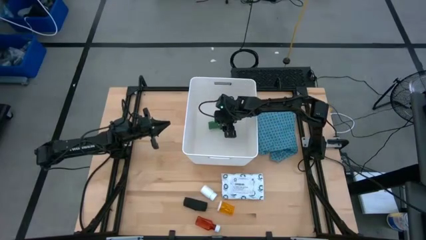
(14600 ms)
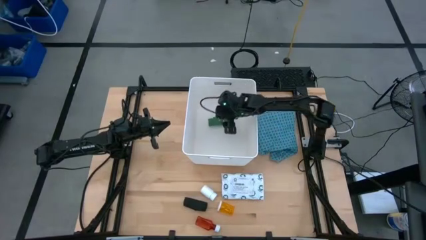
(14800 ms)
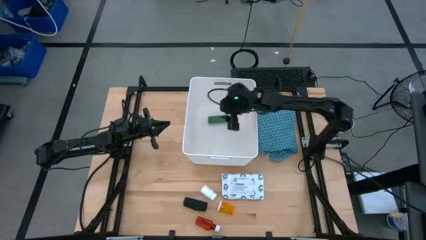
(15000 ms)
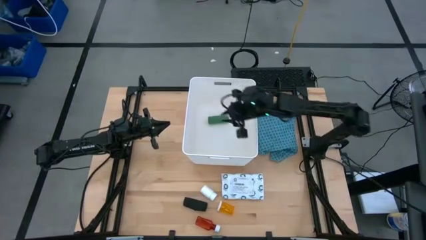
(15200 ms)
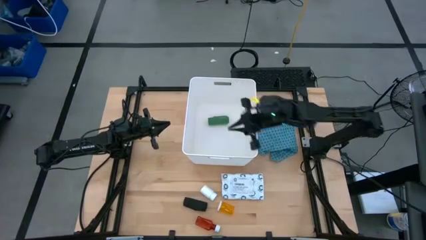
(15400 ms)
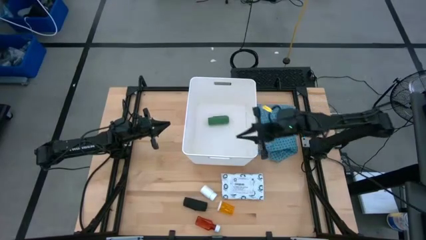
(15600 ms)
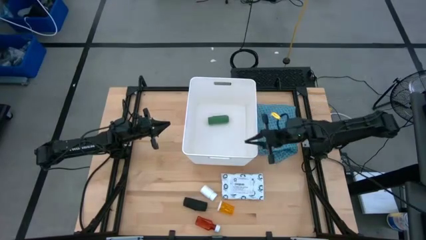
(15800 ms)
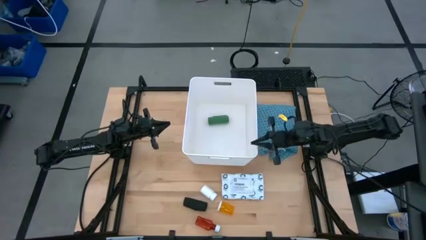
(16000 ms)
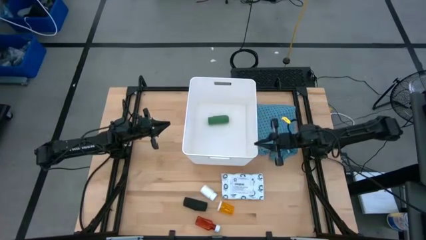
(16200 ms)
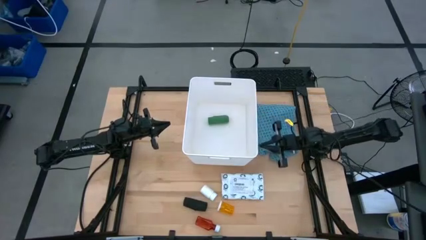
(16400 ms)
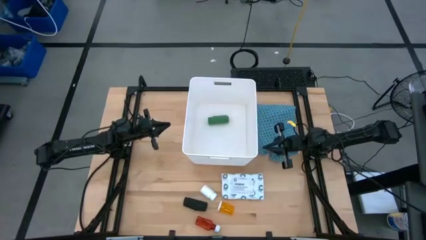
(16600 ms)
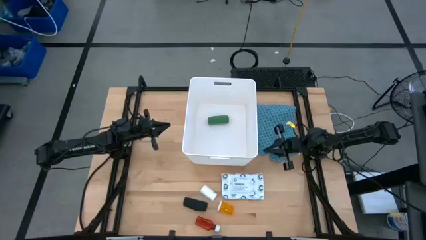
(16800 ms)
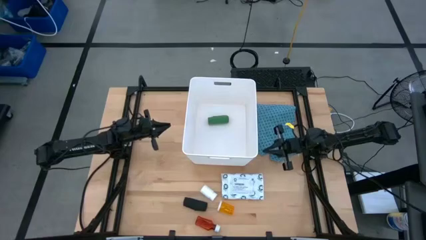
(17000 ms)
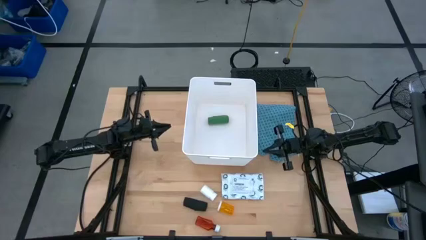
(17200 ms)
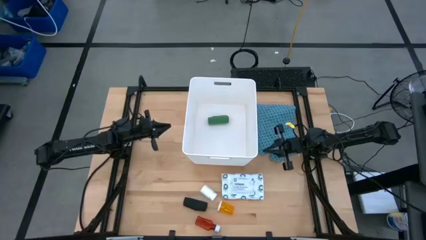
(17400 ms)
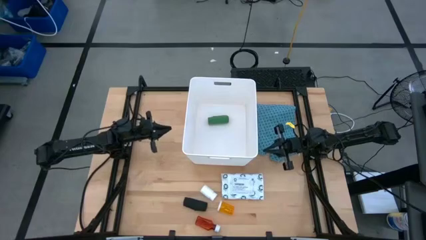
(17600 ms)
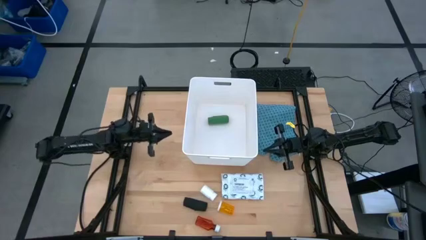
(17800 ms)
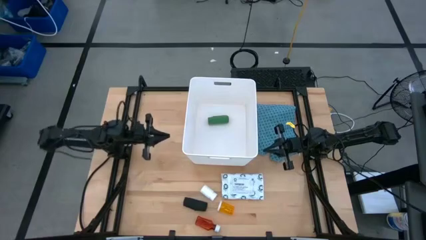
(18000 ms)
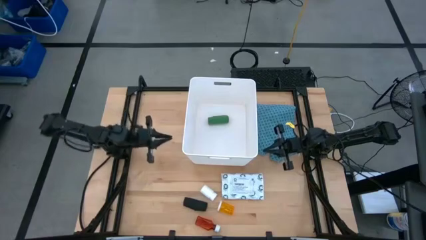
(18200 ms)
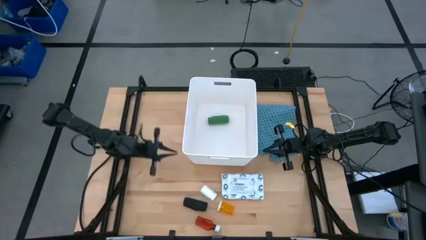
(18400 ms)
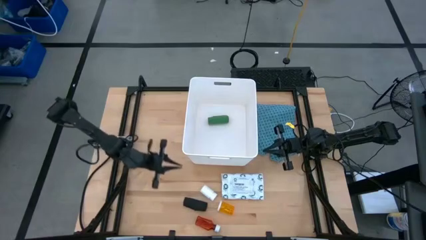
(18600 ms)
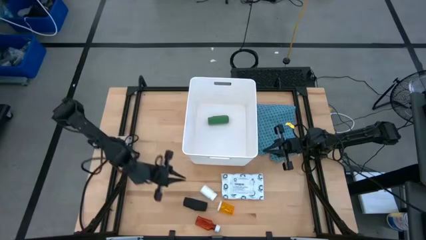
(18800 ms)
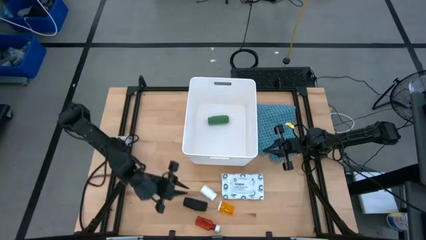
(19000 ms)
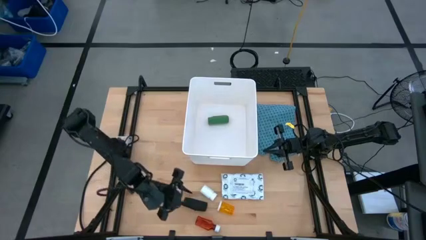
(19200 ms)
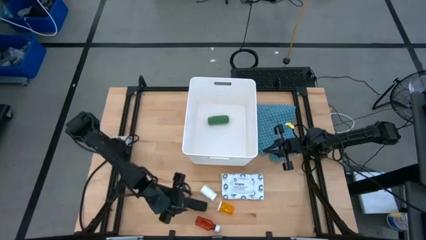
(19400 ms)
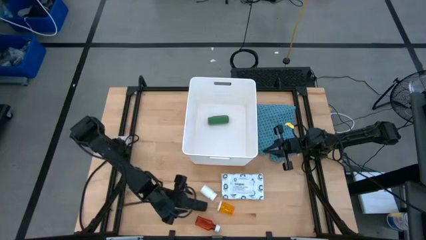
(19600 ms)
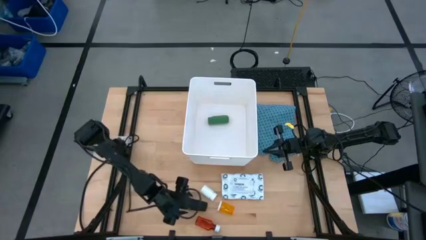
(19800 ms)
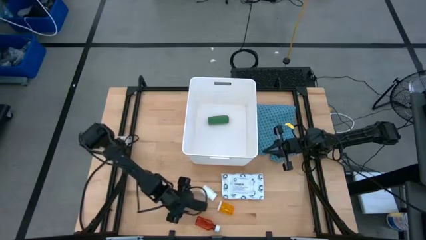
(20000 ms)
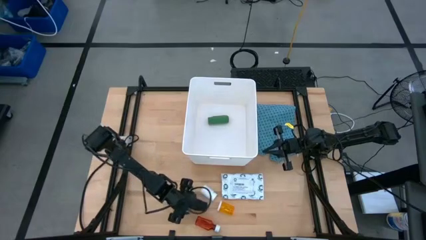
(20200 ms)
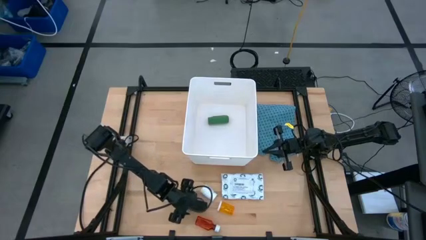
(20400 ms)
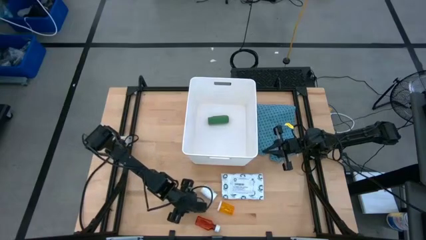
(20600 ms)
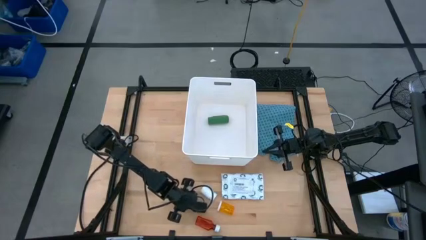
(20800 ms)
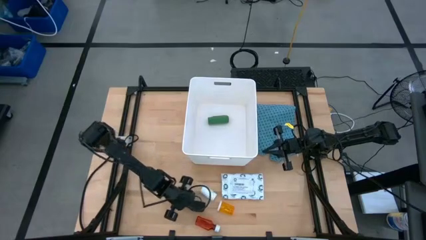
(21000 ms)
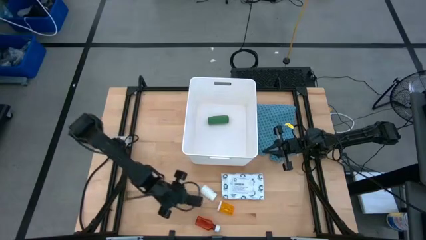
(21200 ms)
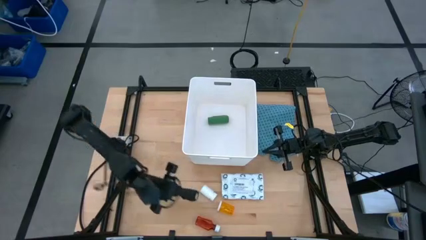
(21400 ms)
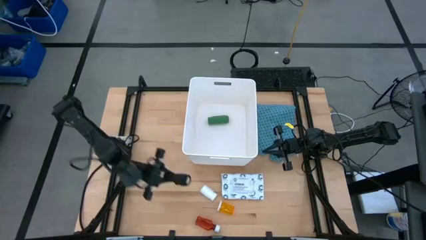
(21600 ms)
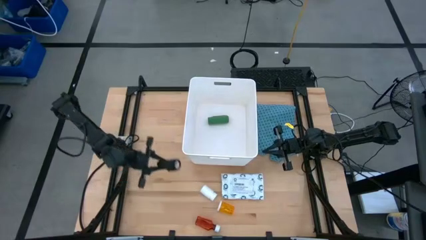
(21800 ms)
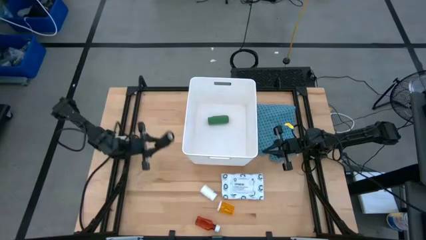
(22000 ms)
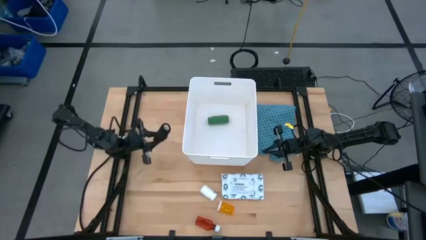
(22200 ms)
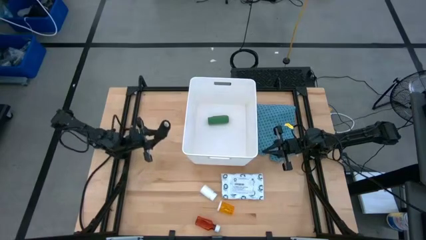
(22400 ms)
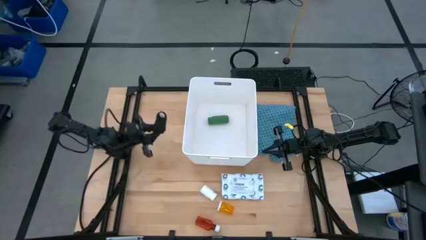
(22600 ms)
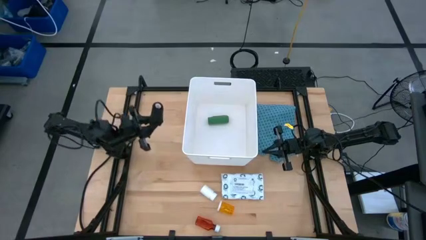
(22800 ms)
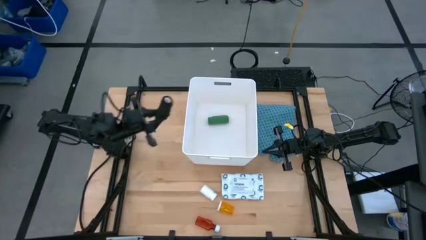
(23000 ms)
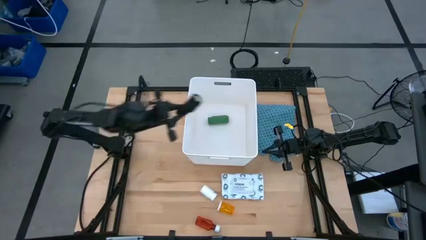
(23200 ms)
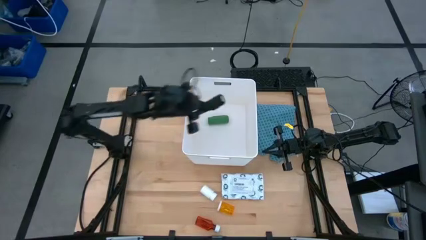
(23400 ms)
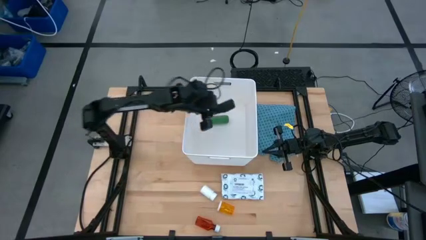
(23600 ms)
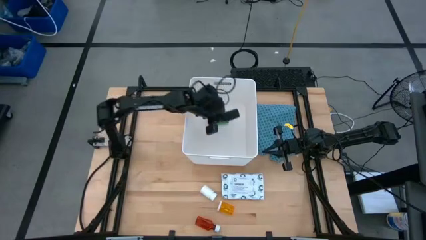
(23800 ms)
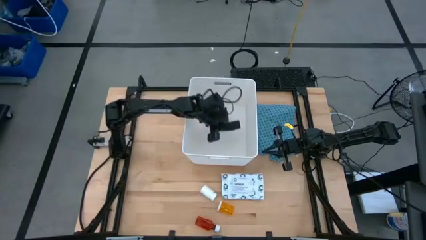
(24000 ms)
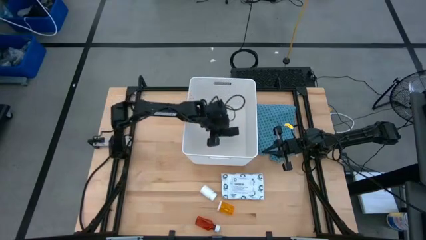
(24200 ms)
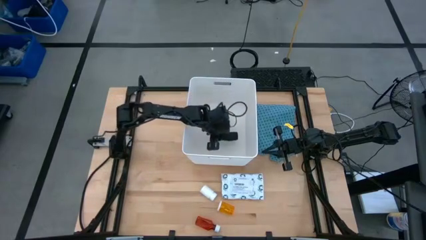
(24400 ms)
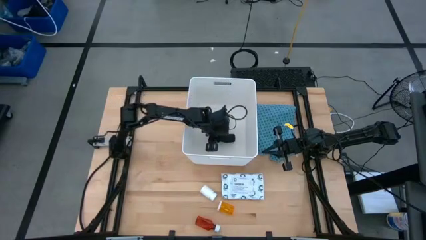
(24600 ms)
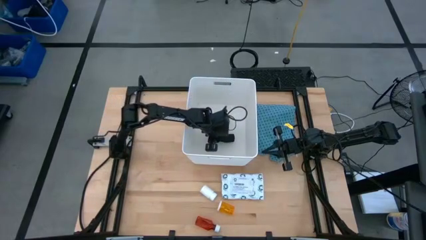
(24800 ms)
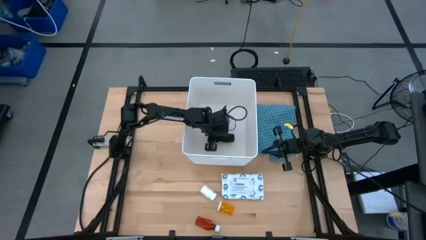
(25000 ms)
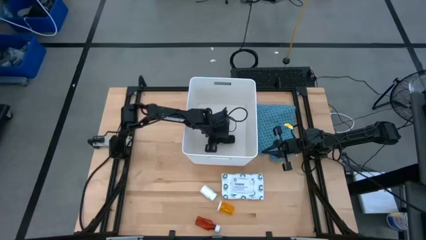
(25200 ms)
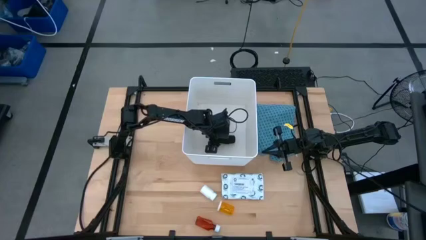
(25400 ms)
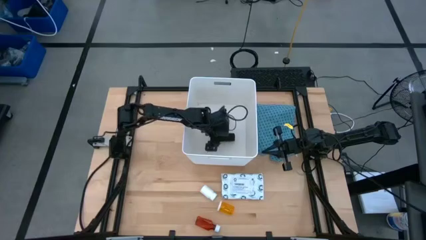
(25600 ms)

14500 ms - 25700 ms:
Task: Pick & place medical supplies in basket/bin
Put the black bandage into the white bin

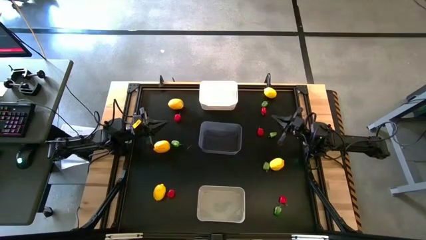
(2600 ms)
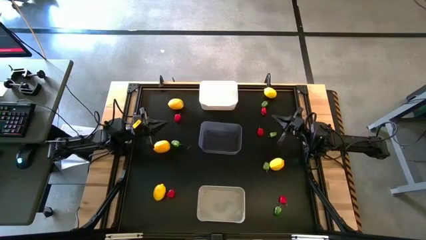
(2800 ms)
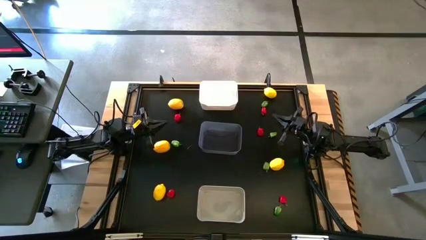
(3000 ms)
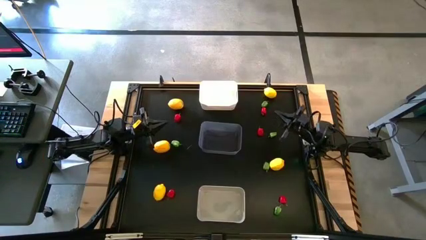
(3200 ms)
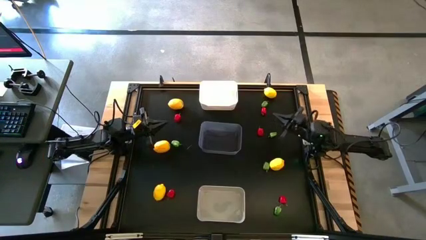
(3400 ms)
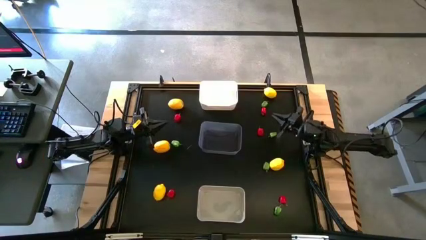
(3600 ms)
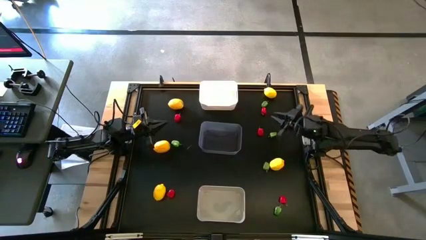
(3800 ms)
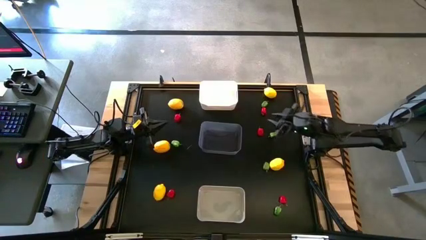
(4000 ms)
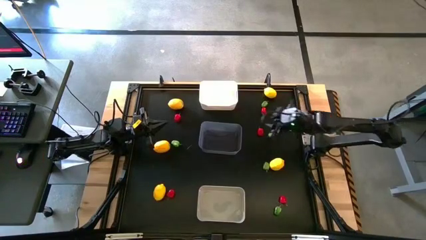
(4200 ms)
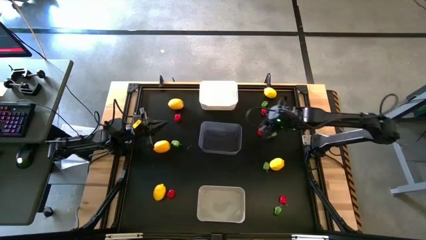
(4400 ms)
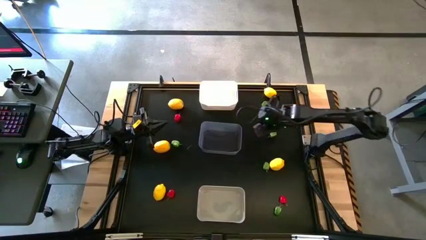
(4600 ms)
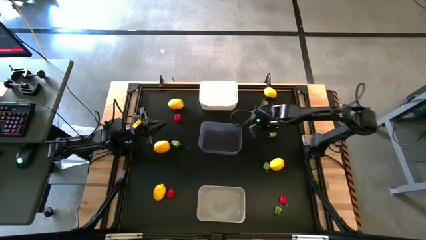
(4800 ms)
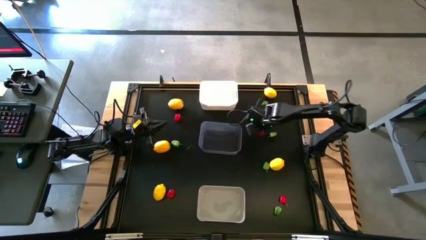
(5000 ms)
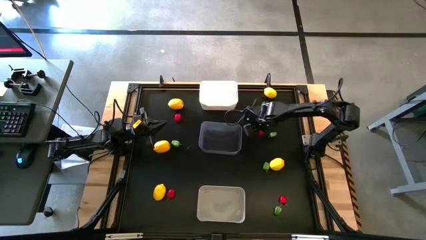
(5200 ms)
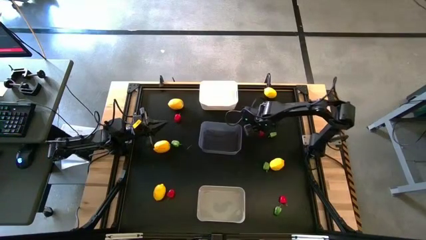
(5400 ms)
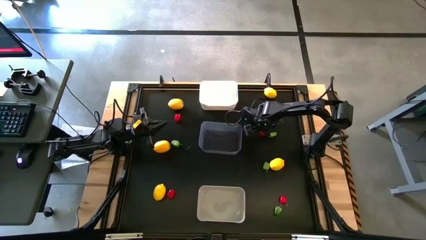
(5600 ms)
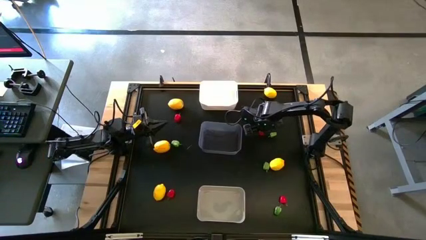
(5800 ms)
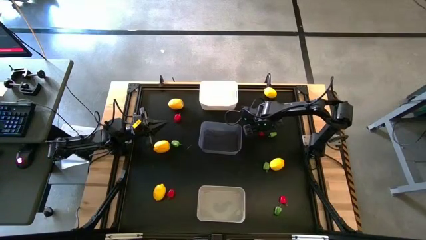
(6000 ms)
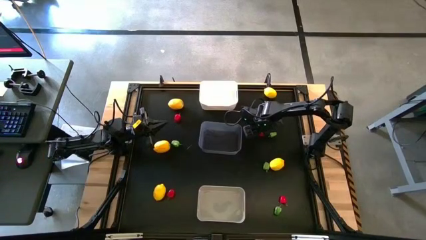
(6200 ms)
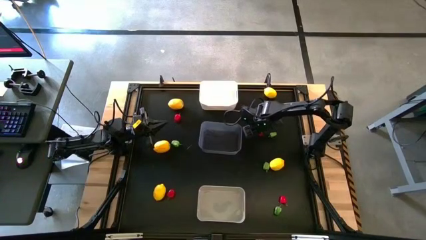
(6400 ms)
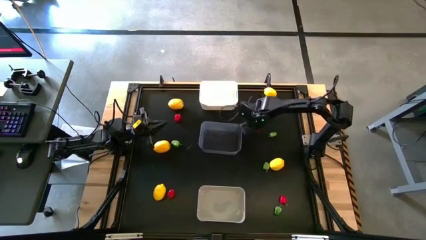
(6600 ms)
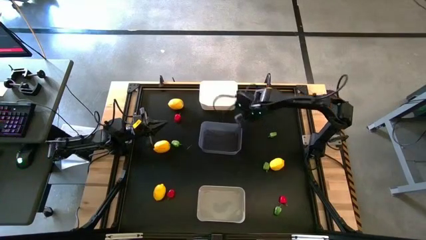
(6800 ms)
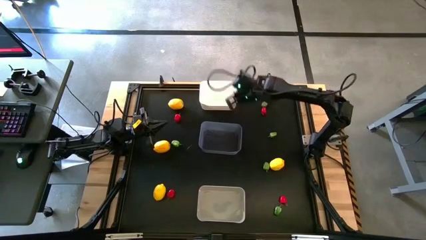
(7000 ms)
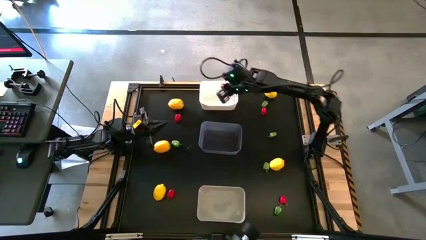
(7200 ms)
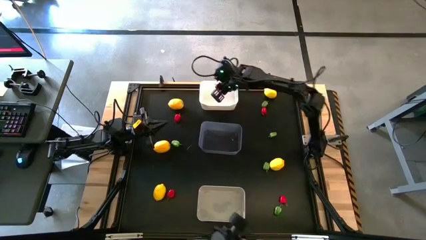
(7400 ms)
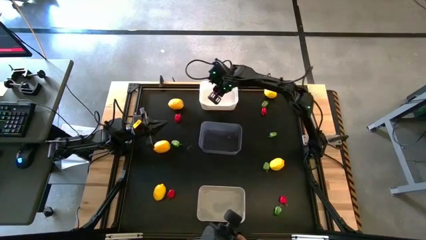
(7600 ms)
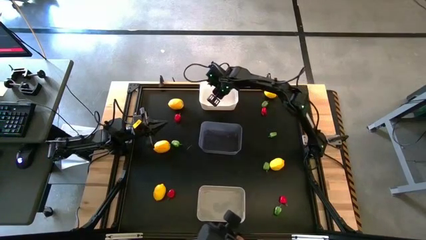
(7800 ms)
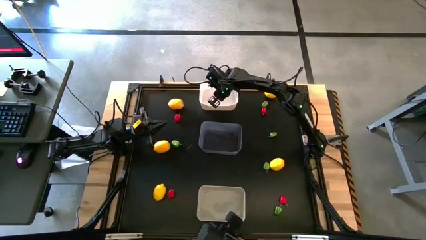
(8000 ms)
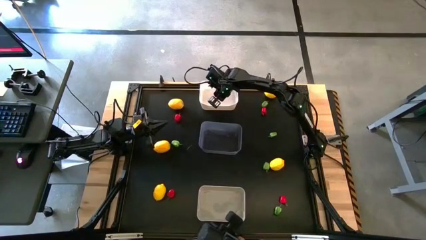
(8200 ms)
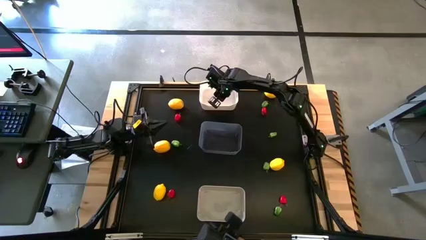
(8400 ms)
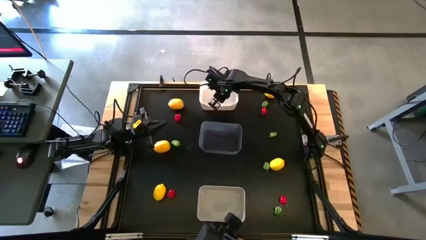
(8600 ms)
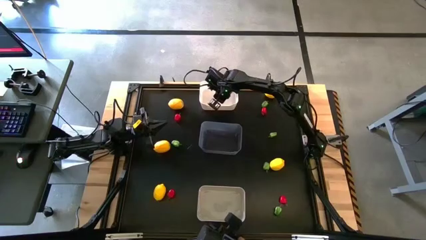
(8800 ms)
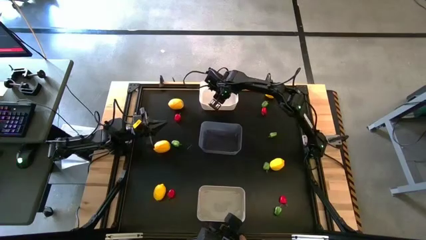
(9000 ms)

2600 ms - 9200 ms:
Task: Sort produce into baskets
Put the red chili pepper into the white bin
